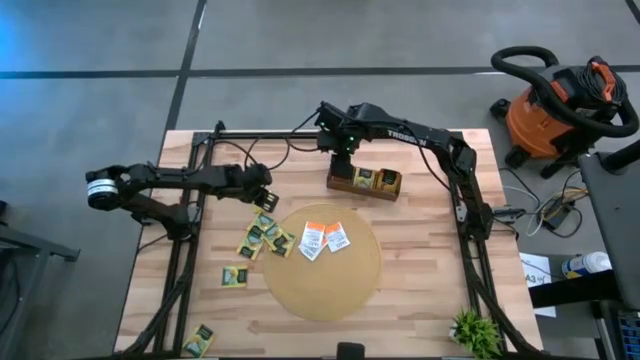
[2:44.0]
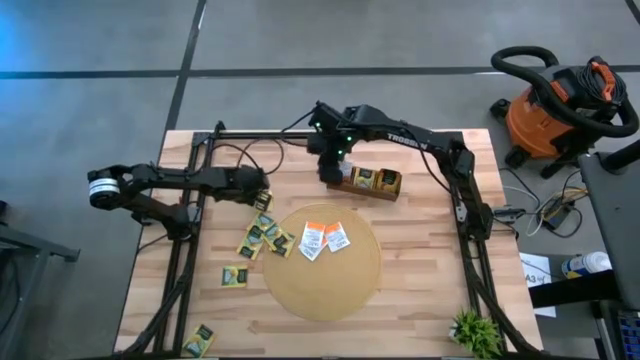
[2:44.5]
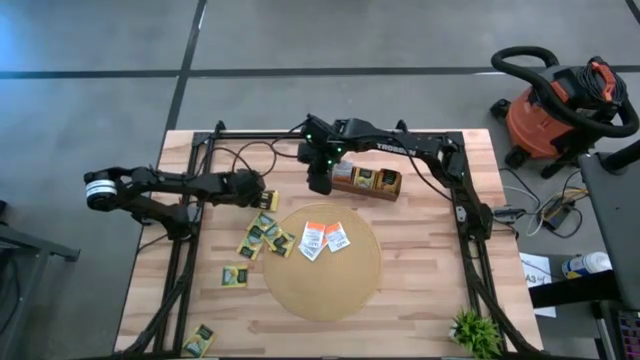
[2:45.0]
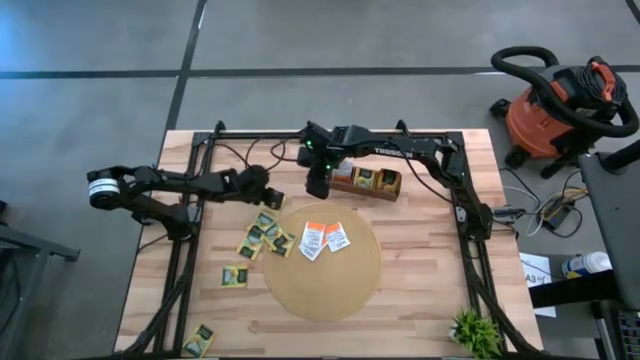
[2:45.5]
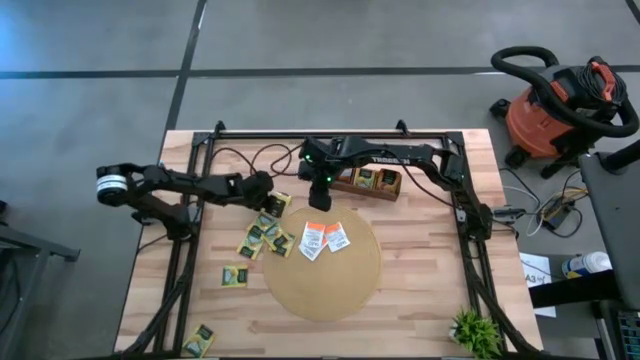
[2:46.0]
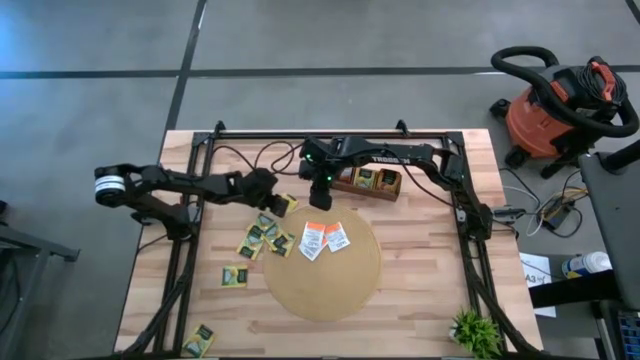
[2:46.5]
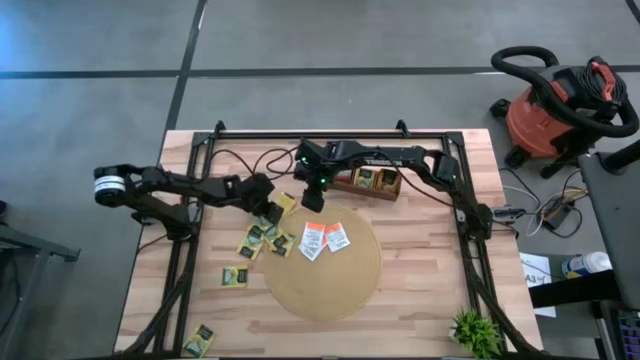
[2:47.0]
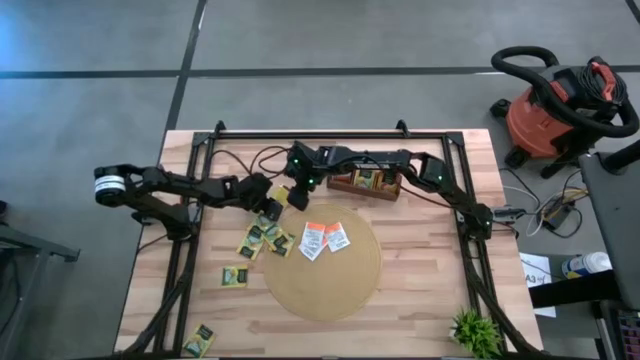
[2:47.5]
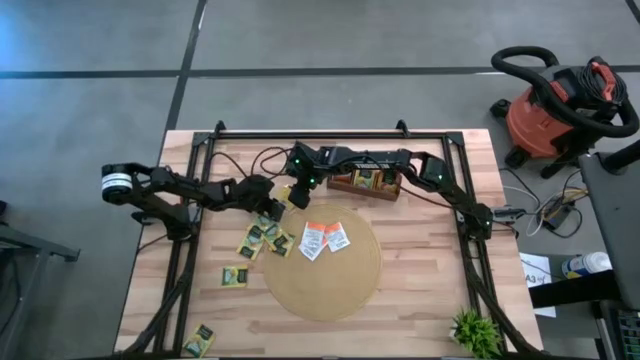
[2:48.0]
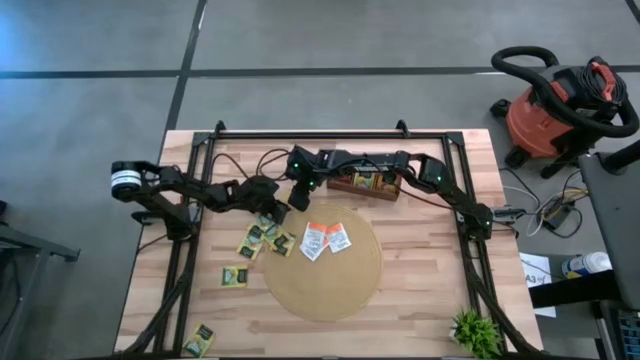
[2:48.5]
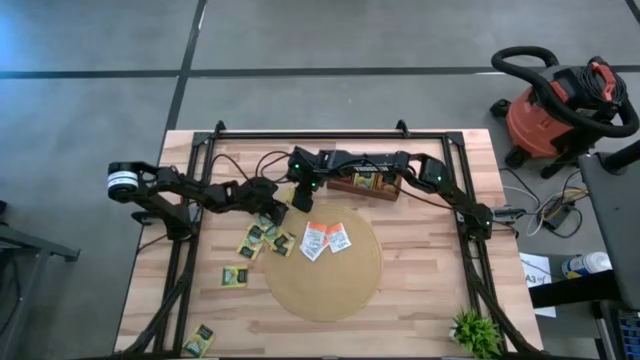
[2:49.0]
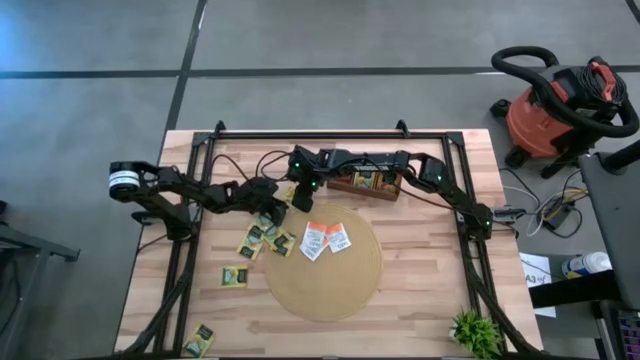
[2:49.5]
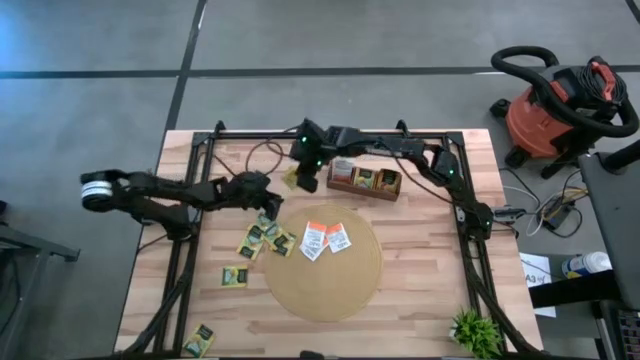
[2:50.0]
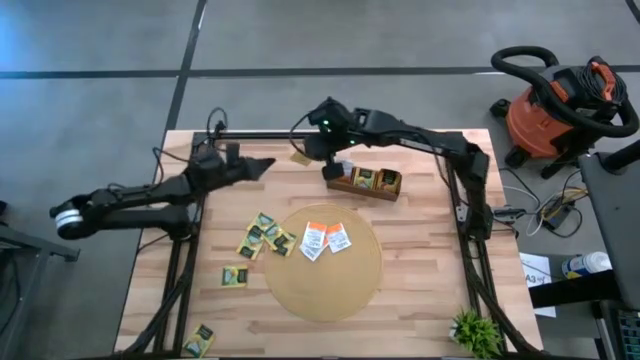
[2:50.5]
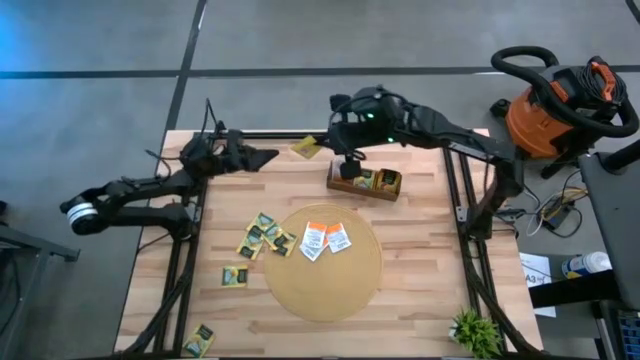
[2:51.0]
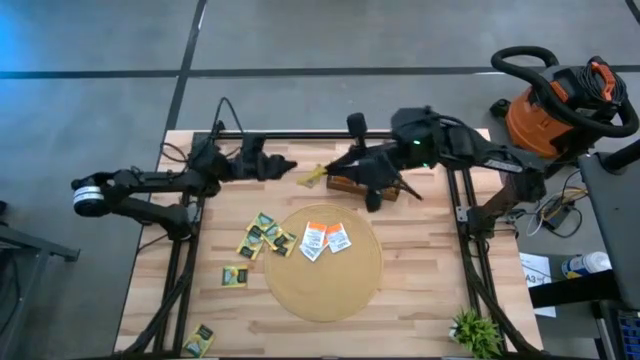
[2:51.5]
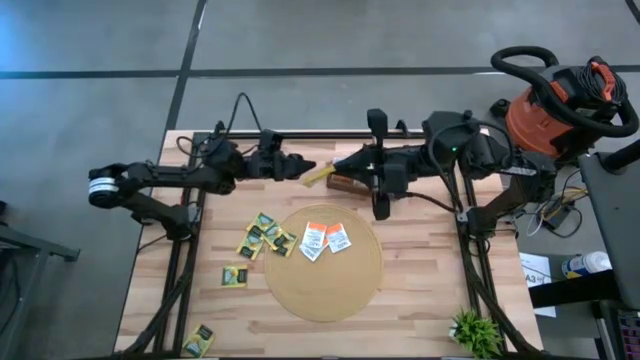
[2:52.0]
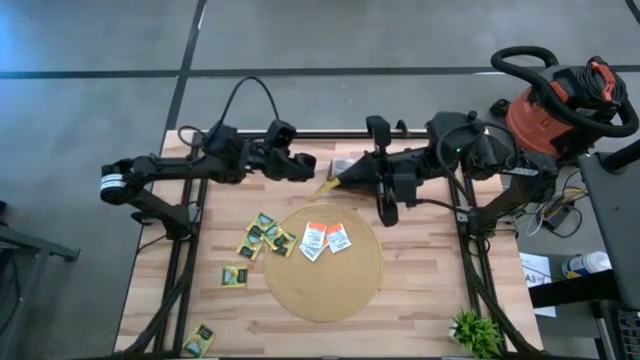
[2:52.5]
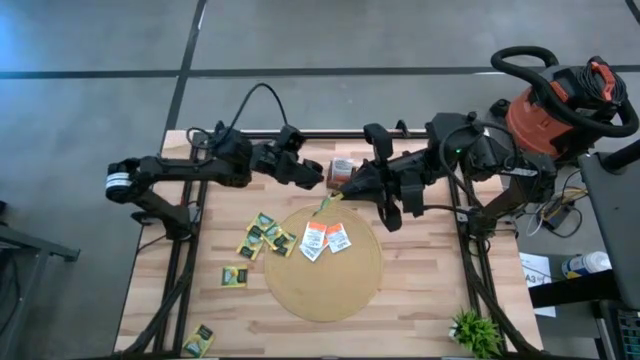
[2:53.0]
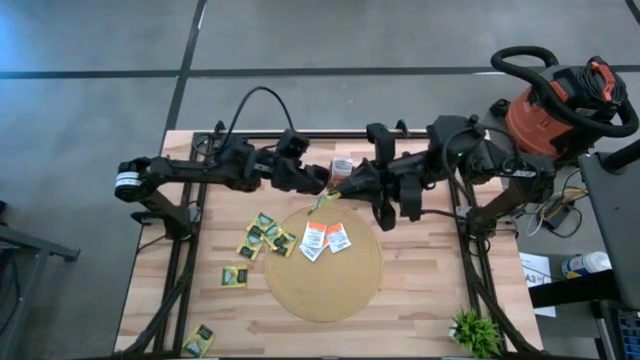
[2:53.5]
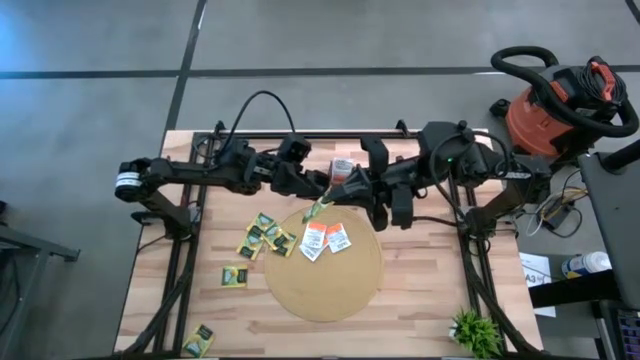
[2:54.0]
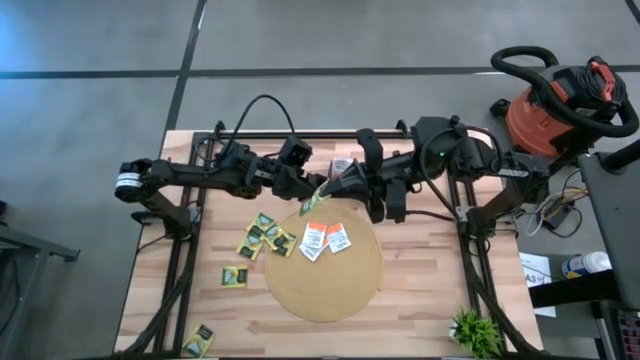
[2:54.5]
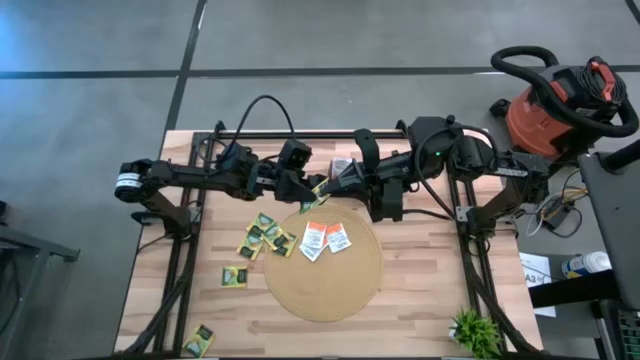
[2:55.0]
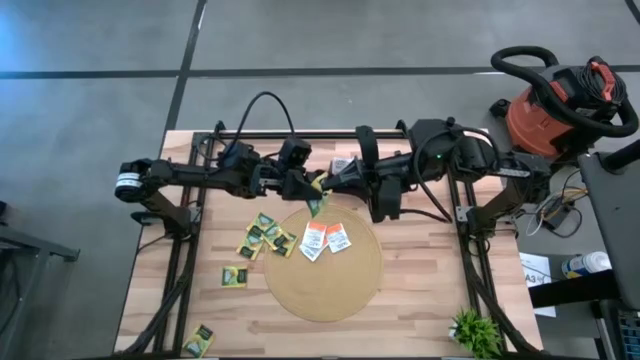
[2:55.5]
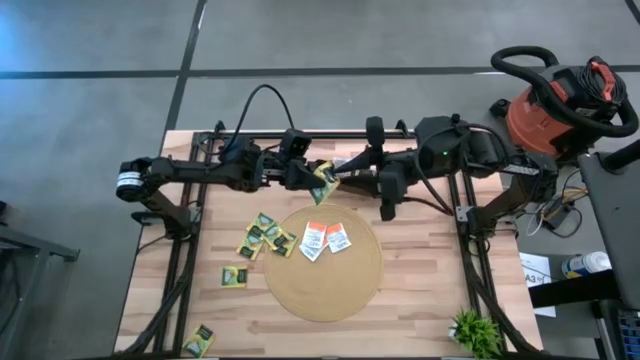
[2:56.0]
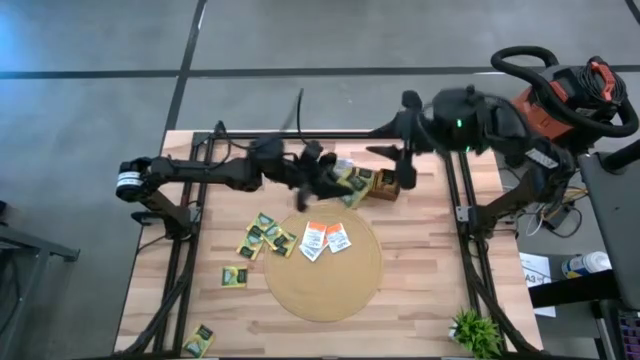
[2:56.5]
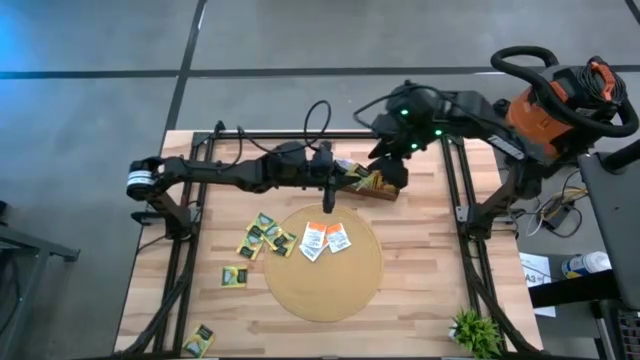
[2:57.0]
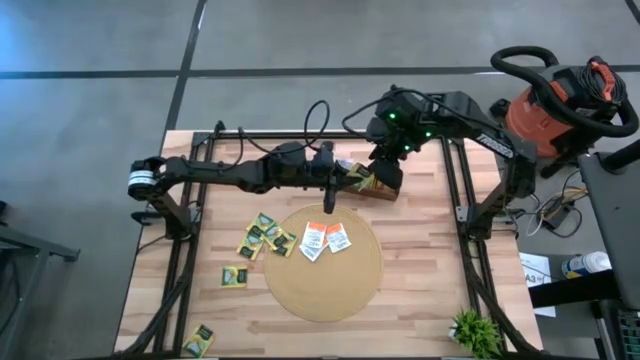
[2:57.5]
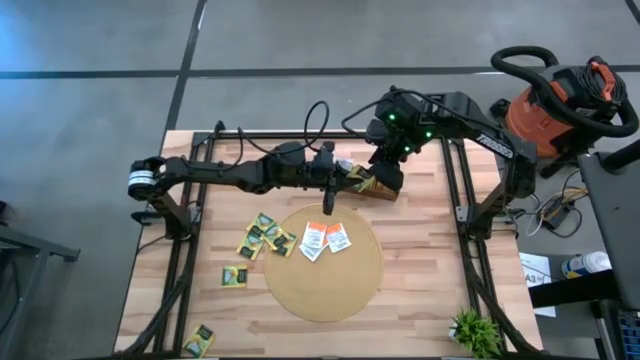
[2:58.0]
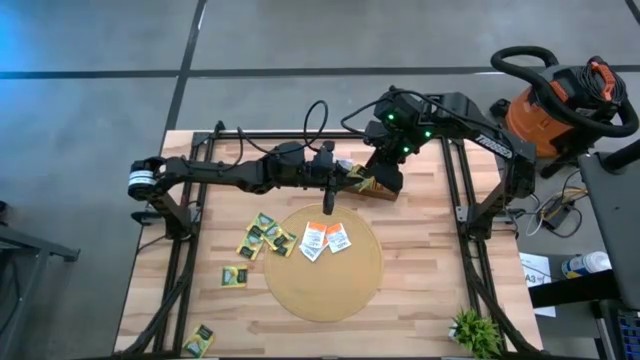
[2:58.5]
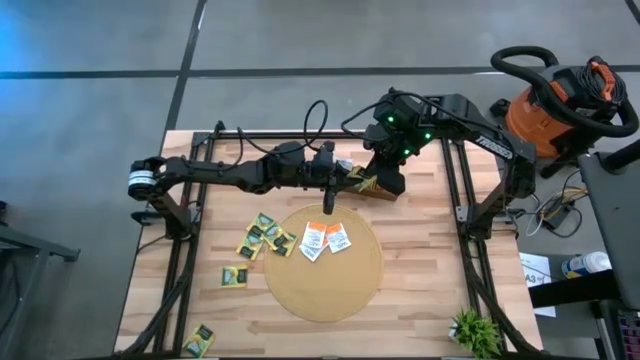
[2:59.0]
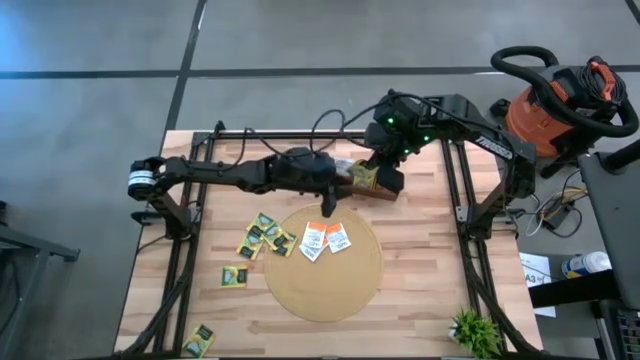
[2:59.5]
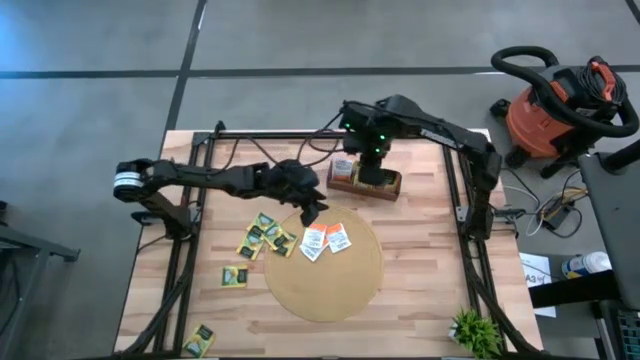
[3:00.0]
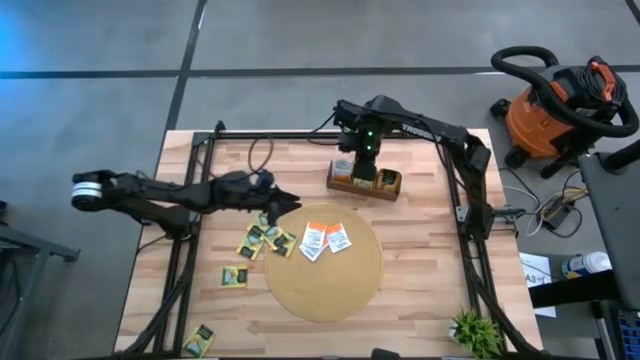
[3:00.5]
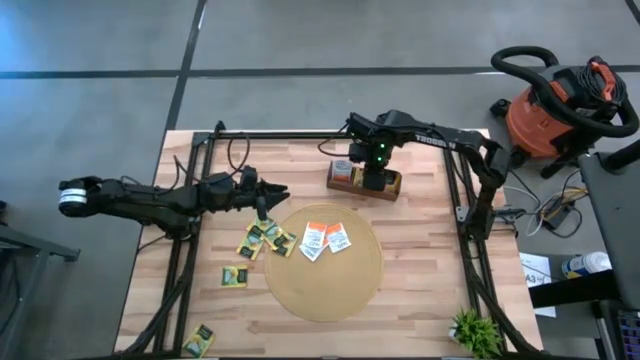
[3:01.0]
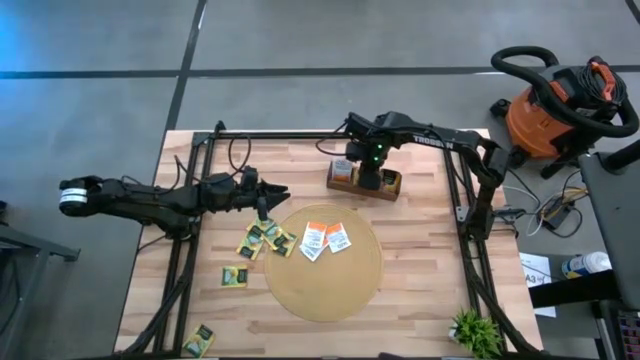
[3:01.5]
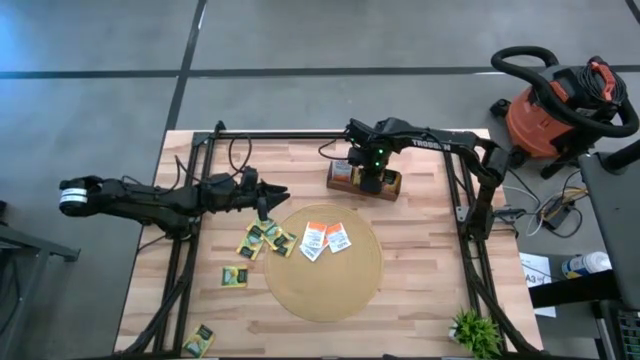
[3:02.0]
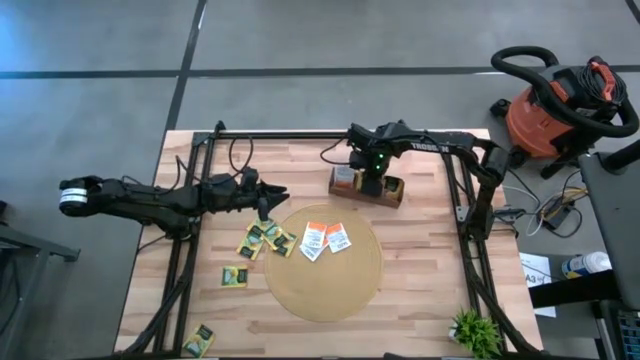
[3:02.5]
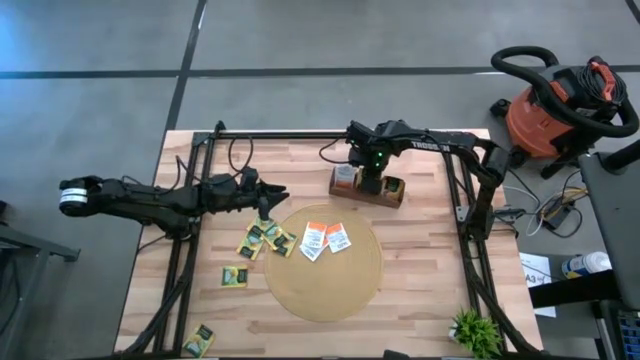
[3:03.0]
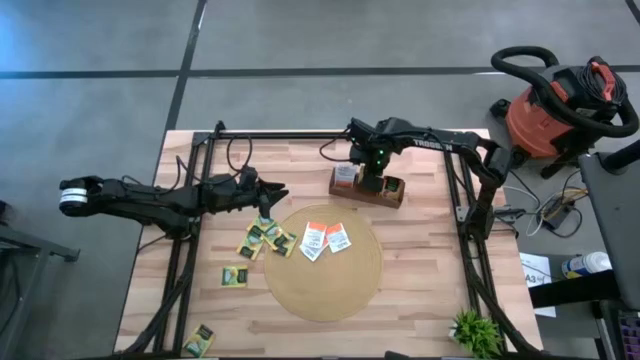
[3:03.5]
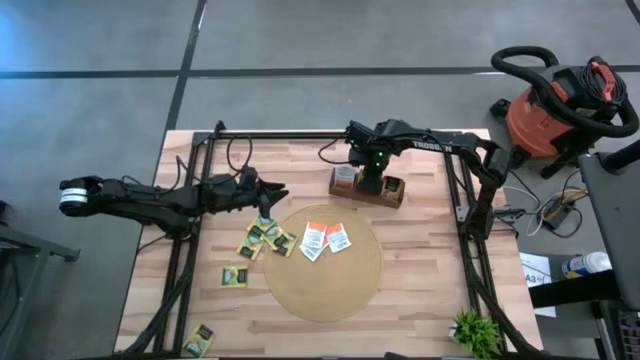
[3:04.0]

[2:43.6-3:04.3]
Task: Pick & Place Tea
Put the lemon tea bag into the left section of the wooden organizer
